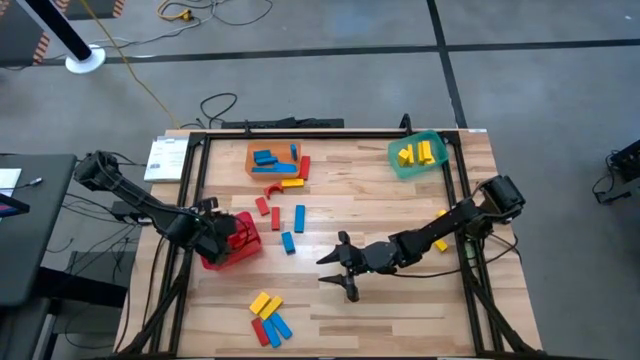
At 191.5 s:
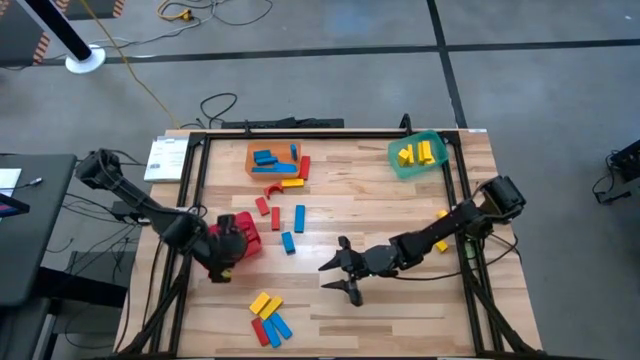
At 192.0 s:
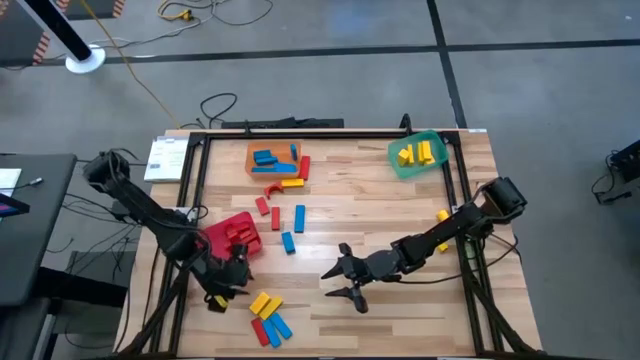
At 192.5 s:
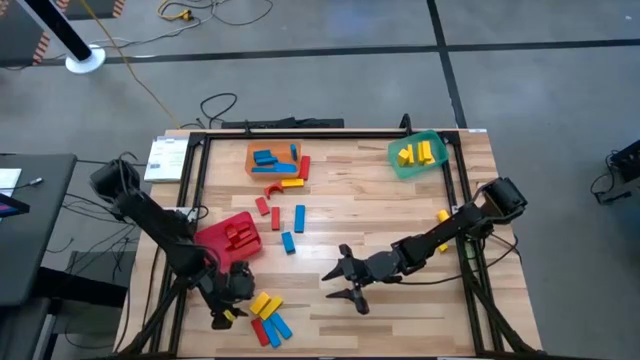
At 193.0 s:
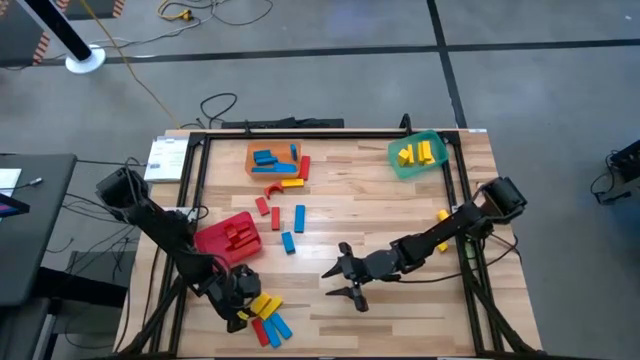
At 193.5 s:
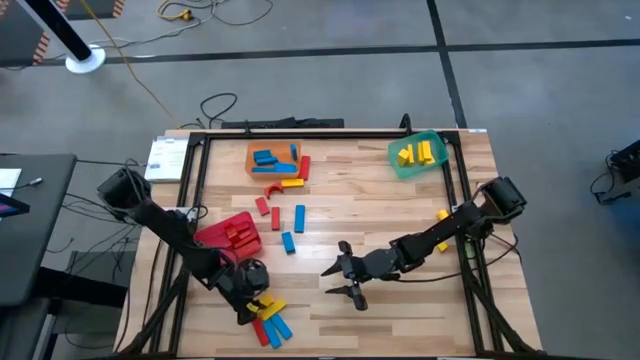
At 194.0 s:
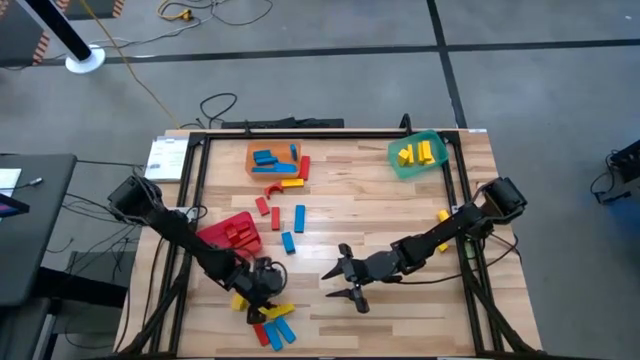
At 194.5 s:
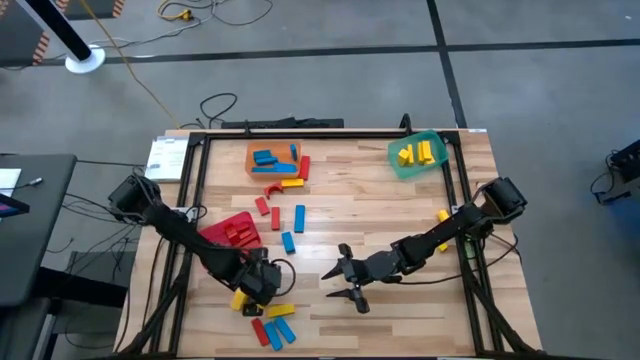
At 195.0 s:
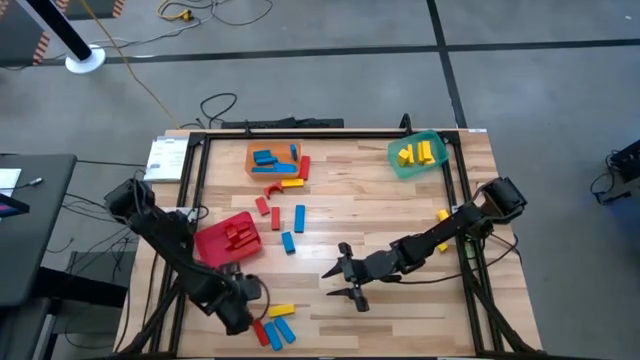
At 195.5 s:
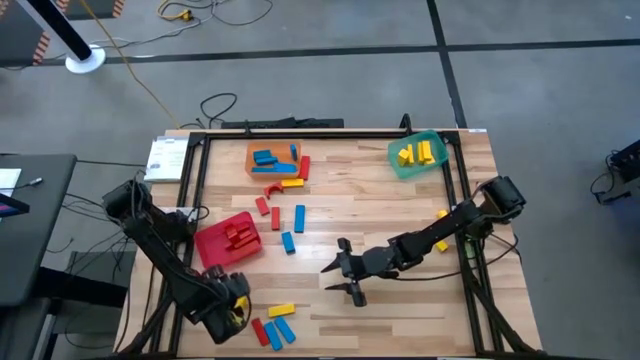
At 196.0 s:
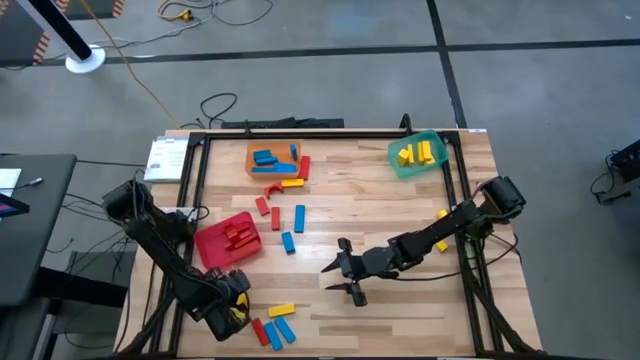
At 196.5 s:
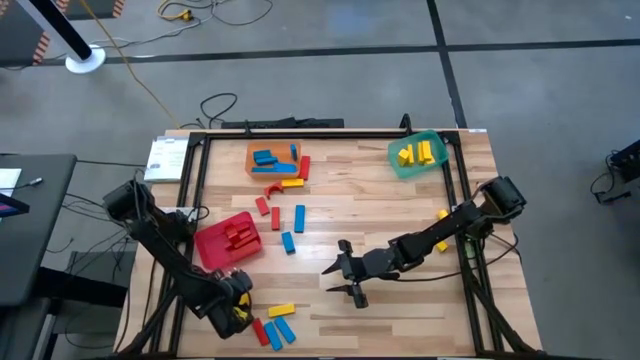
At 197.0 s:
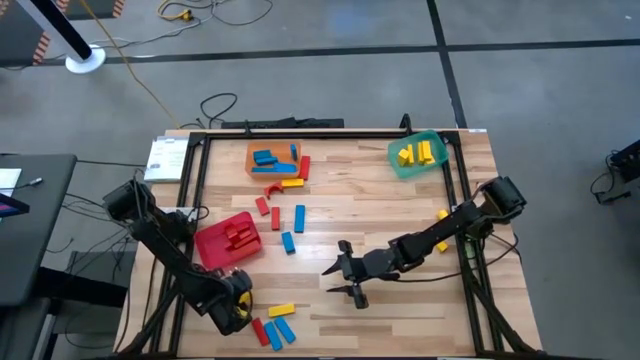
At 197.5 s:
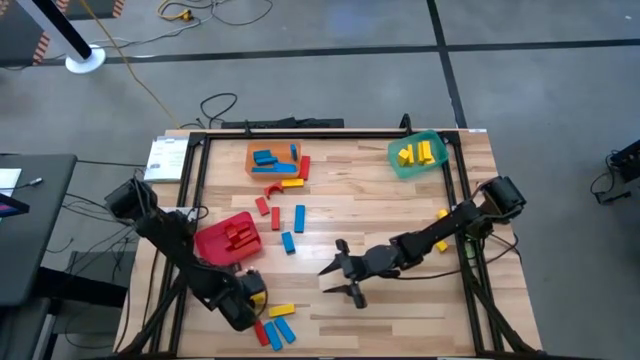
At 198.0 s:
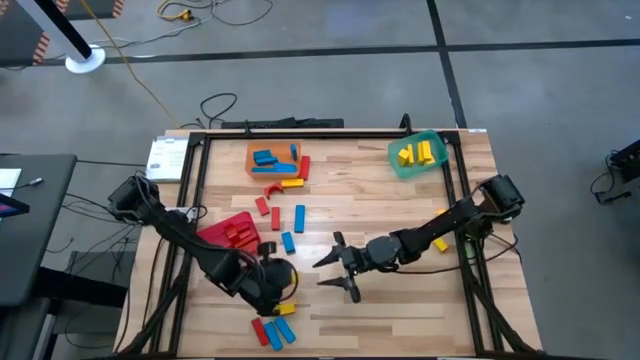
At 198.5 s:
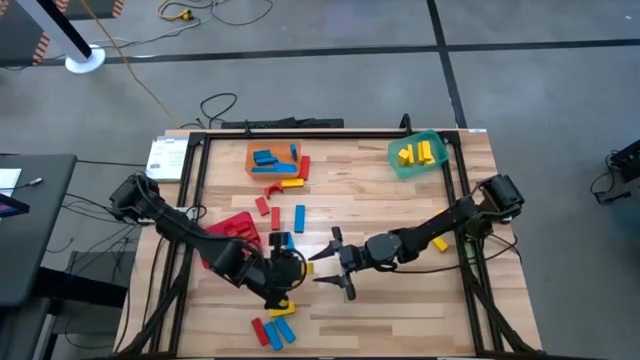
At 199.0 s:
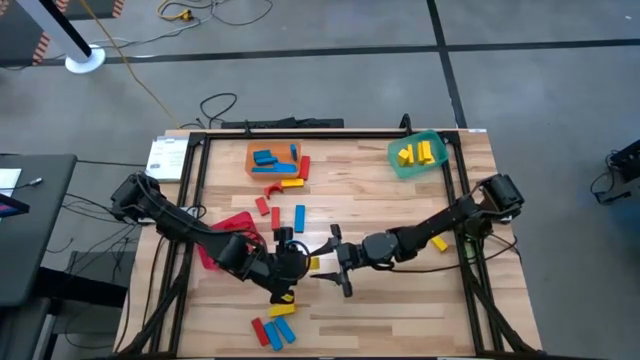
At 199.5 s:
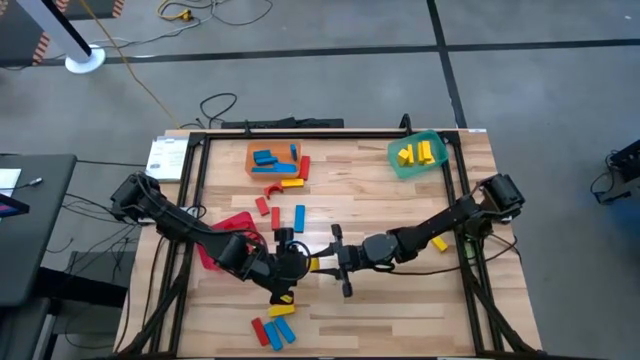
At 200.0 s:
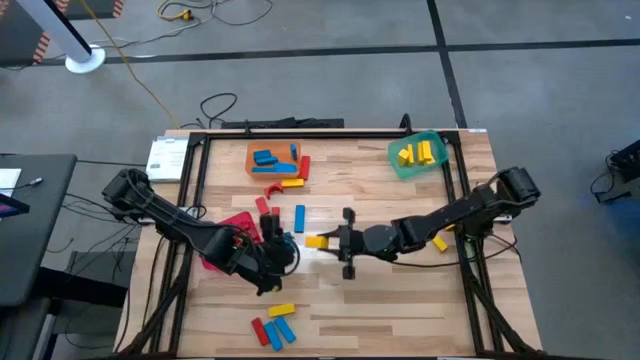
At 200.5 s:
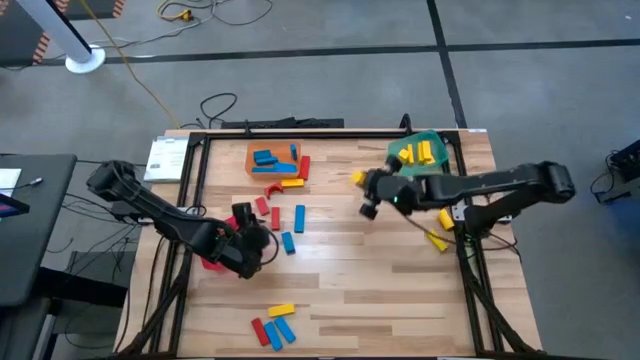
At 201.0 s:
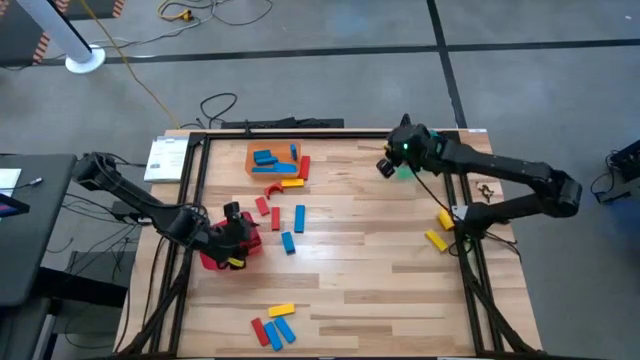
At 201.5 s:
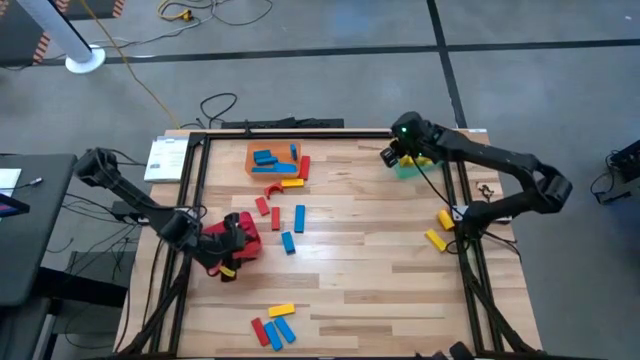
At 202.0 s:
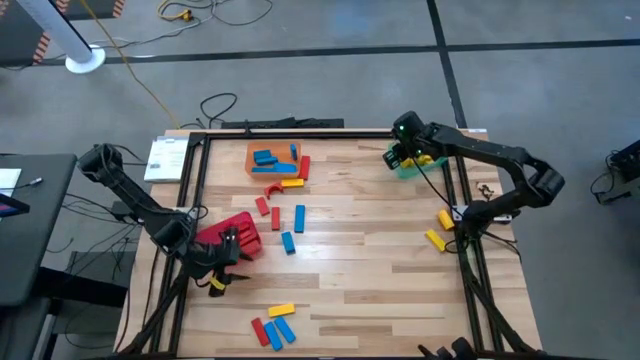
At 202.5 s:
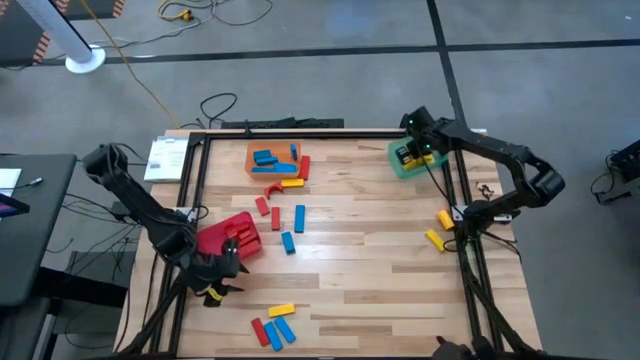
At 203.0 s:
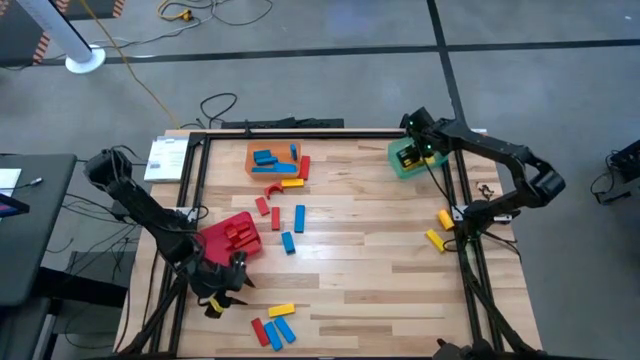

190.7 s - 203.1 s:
Task: Sort blocks
Put the yellow block into the green bin

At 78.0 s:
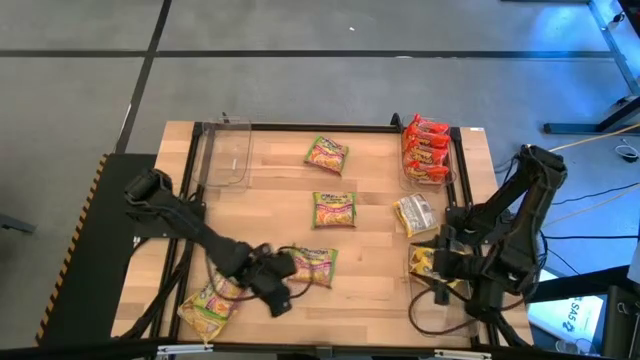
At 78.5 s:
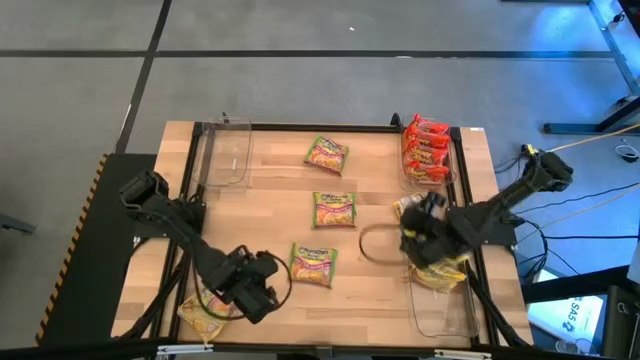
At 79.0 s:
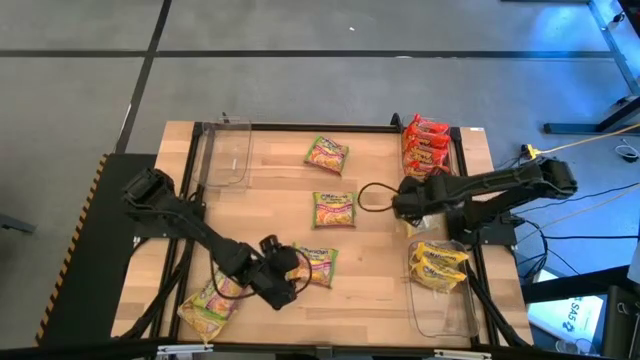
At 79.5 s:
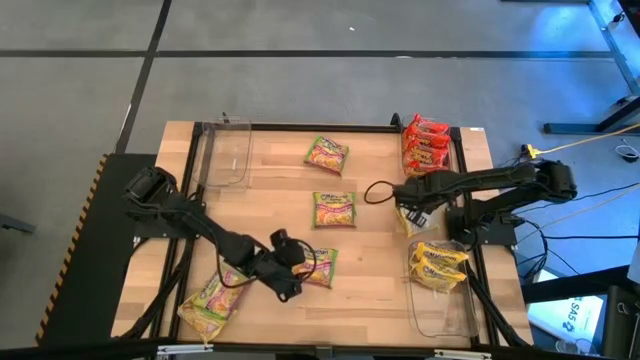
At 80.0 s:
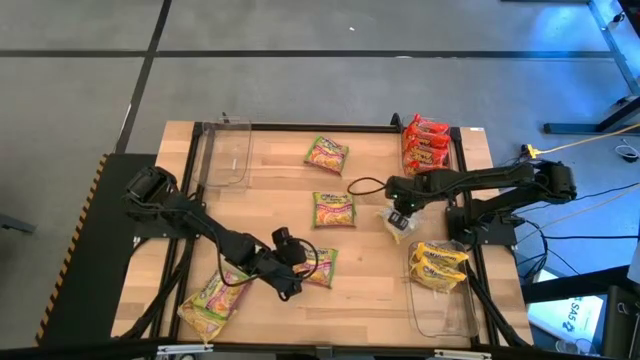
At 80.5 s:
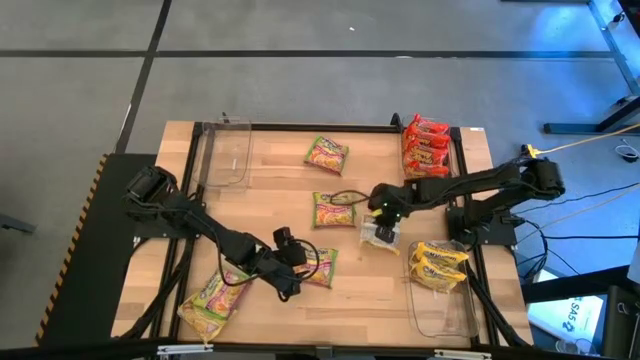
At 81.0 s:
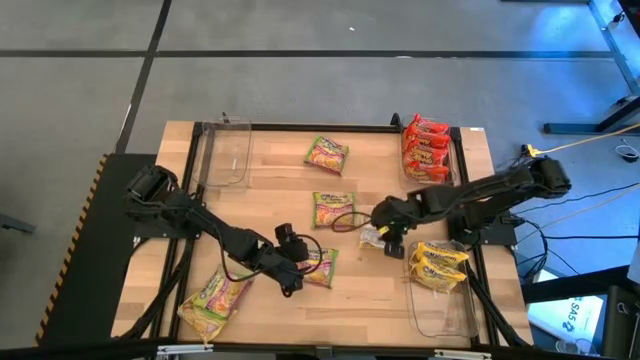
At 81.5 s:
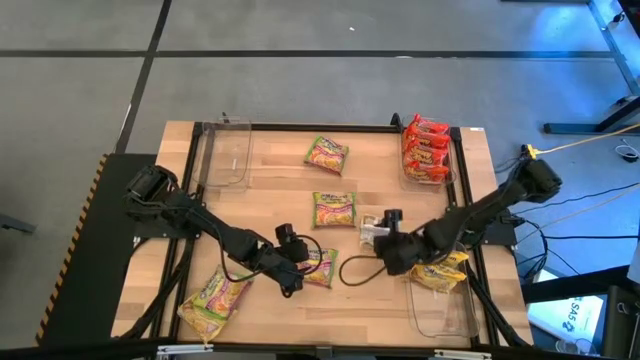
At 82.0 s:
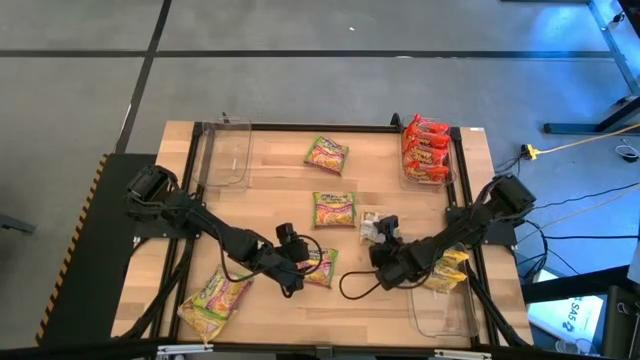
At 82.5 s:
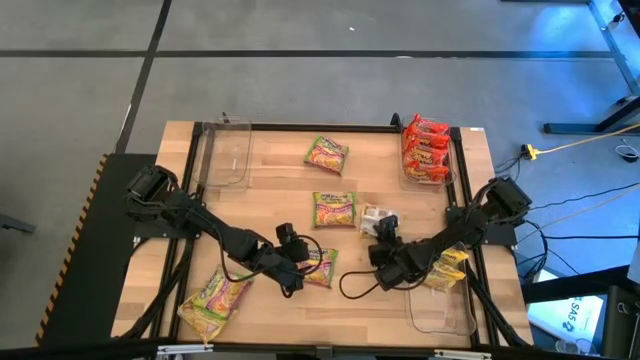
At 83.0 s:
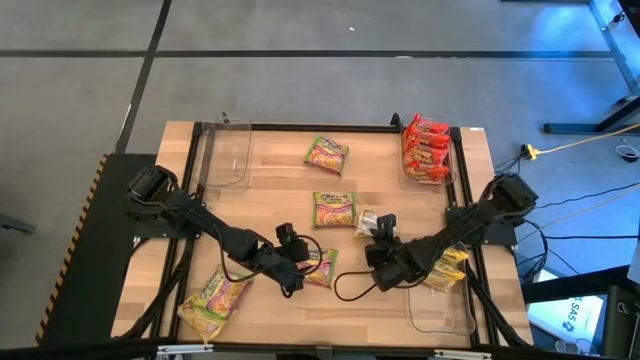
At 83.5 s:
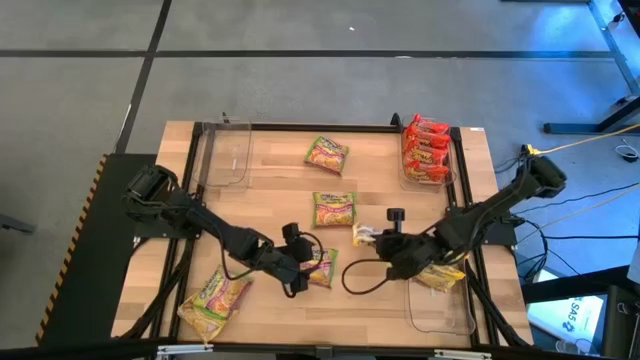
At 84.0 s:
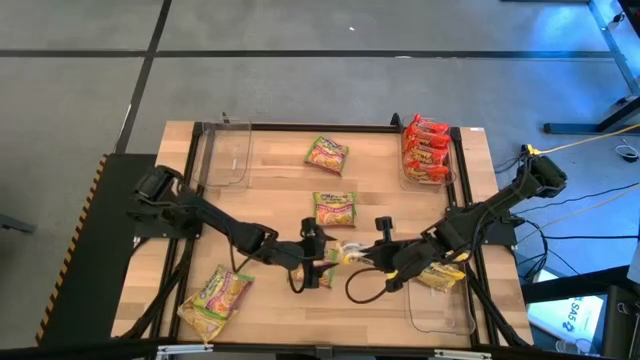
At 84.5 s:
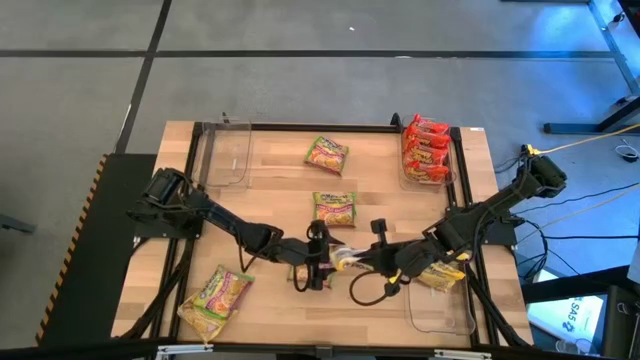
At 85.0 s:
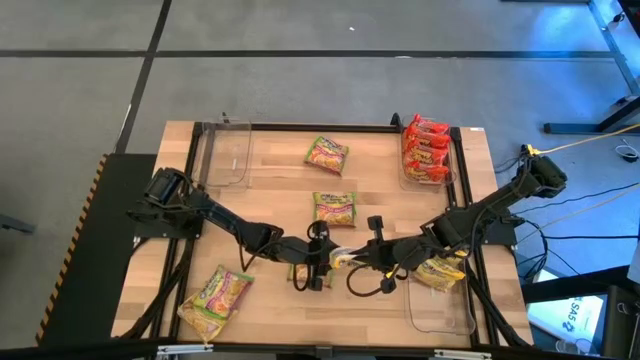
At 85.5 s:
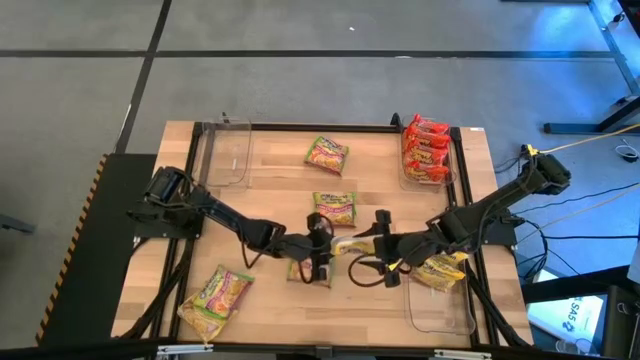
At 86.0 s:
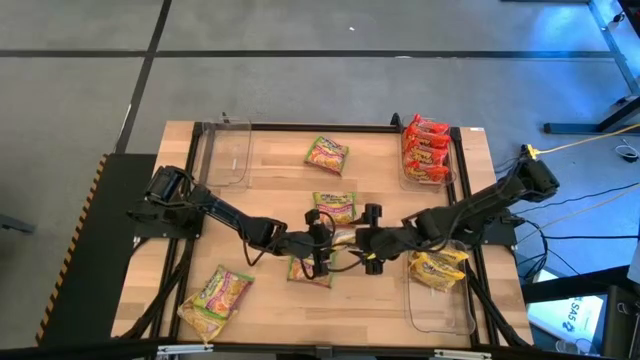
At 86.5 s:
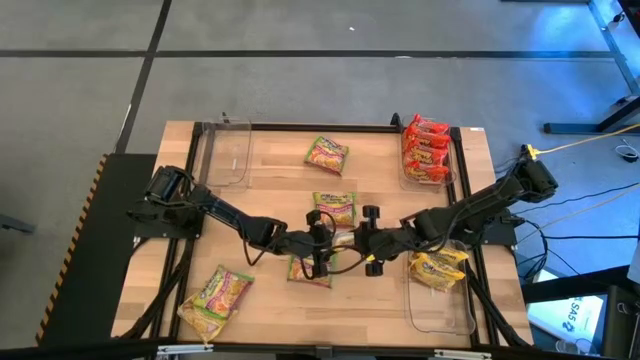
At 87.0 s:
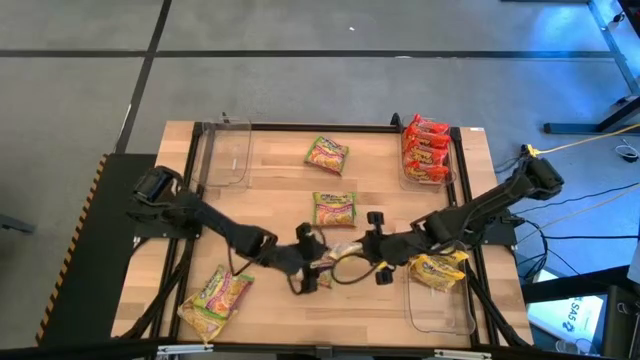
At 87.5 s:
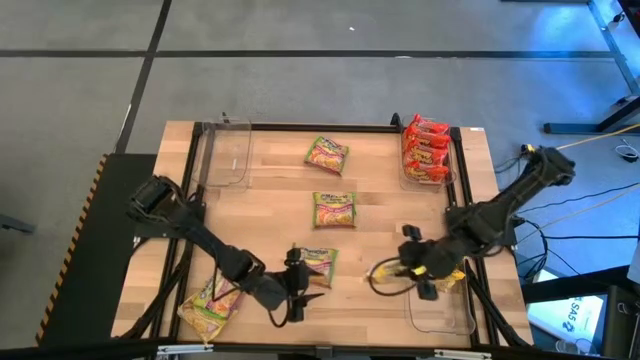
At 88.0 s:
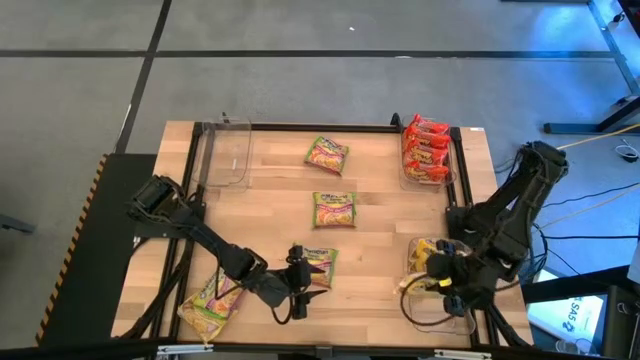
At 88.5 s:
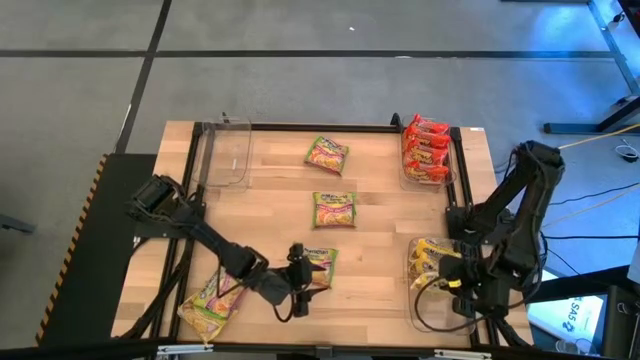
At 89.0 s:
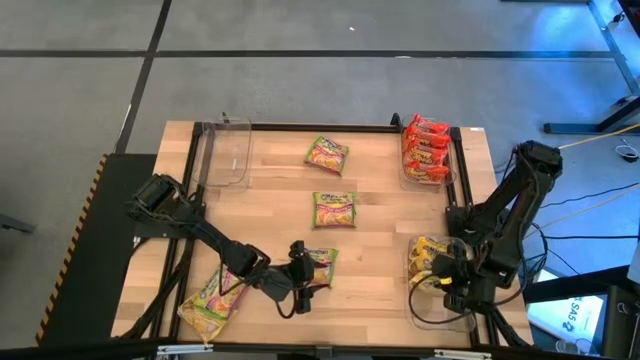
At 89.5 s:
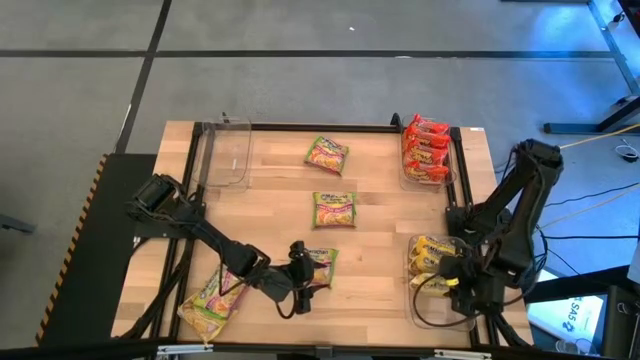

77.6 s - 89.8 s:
Task: Sort Maruchan noodles
Put the yellow noodle pack into the bottom transparent bin
